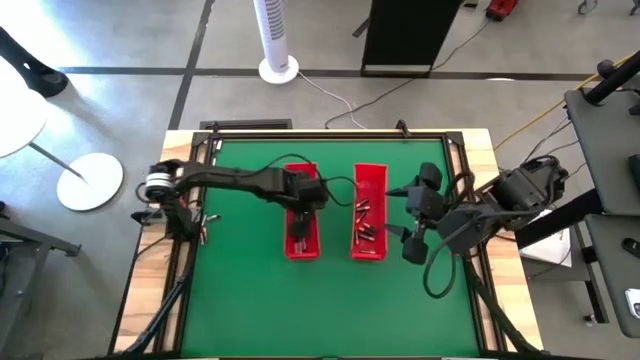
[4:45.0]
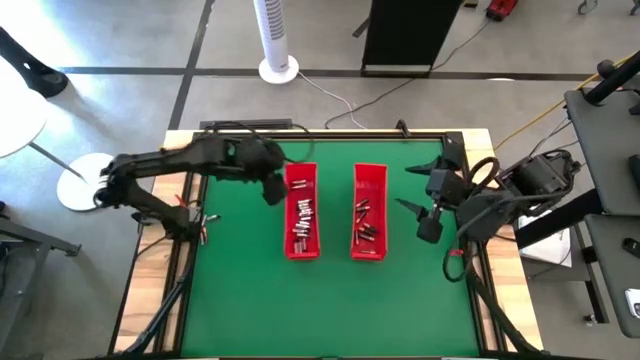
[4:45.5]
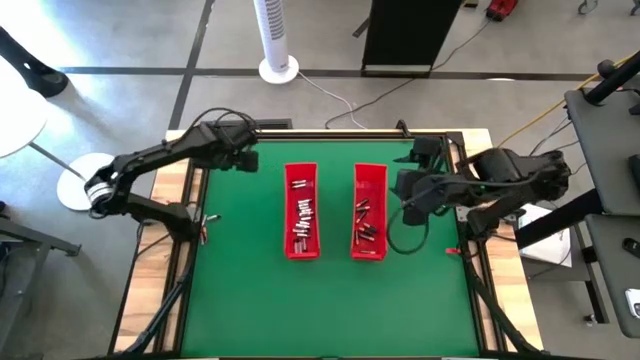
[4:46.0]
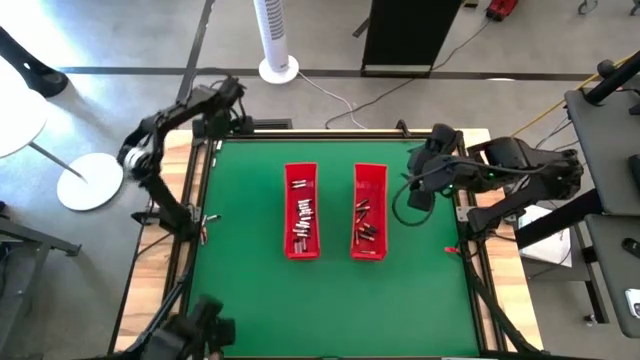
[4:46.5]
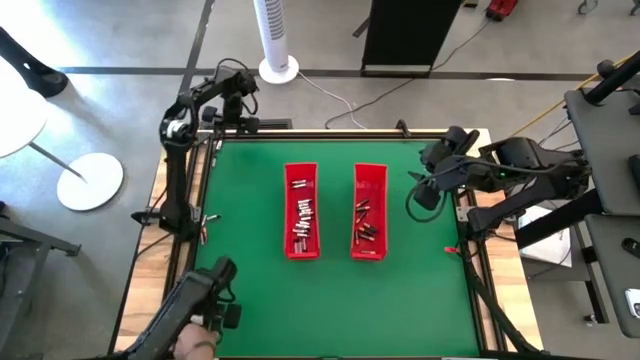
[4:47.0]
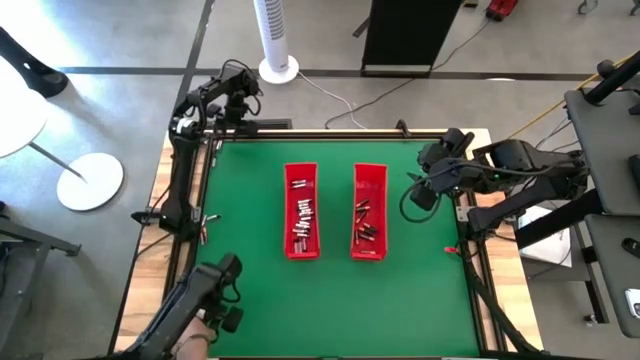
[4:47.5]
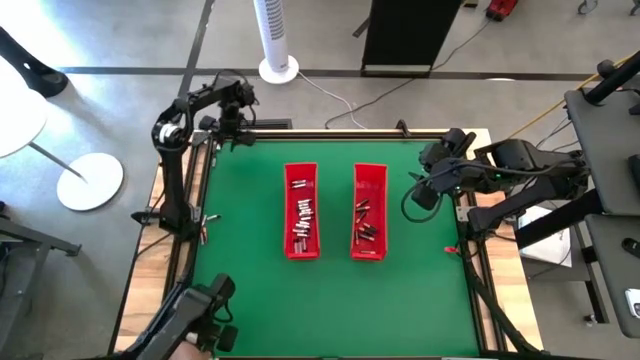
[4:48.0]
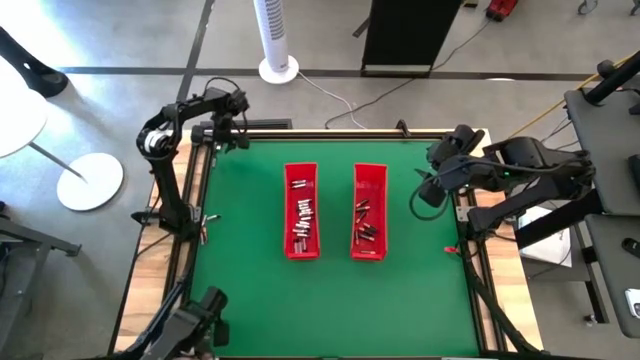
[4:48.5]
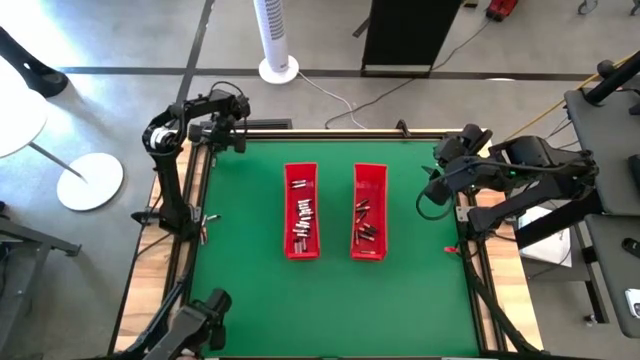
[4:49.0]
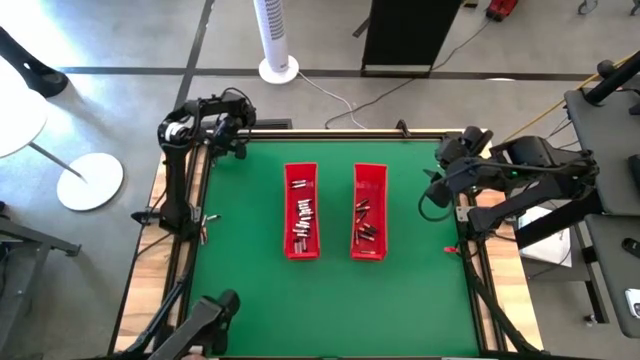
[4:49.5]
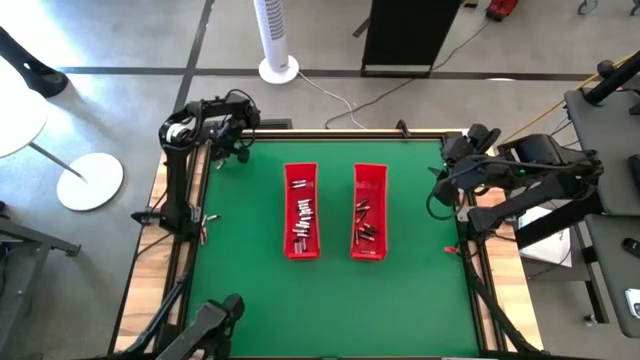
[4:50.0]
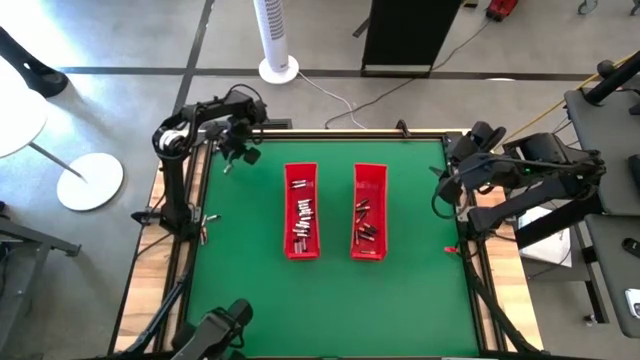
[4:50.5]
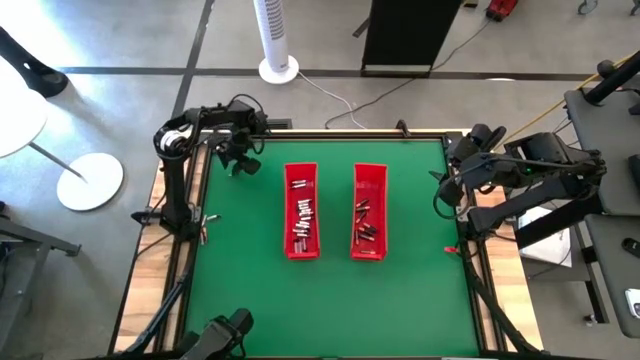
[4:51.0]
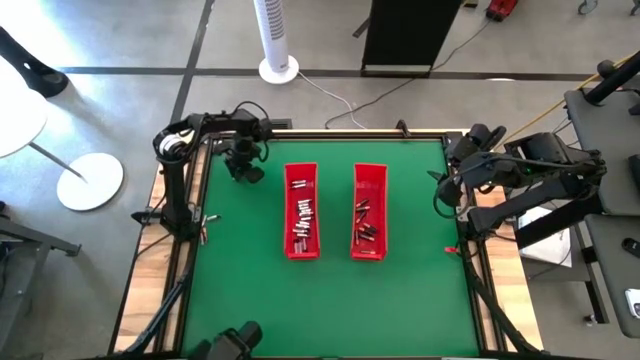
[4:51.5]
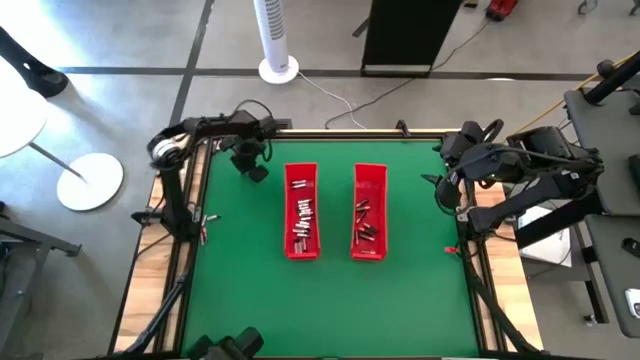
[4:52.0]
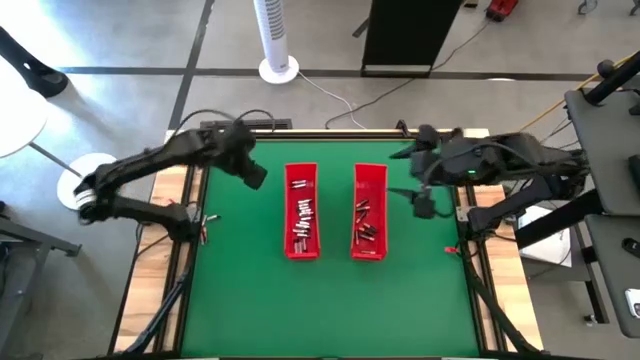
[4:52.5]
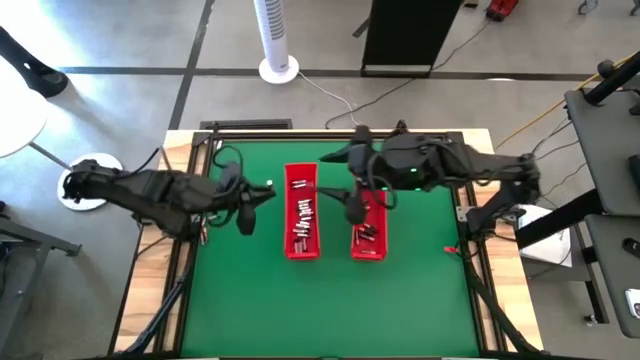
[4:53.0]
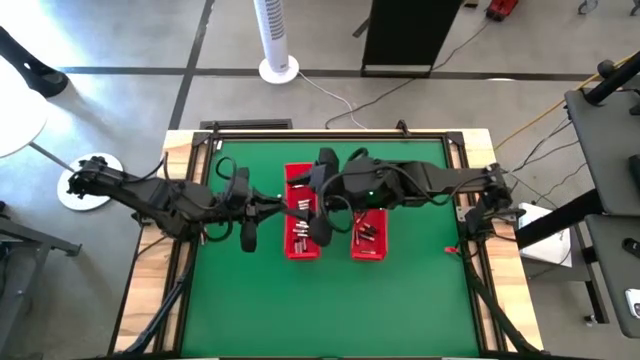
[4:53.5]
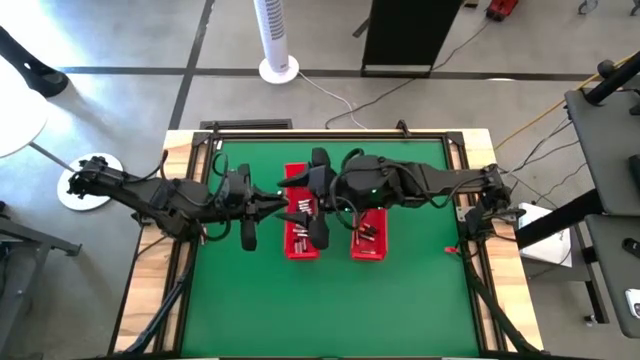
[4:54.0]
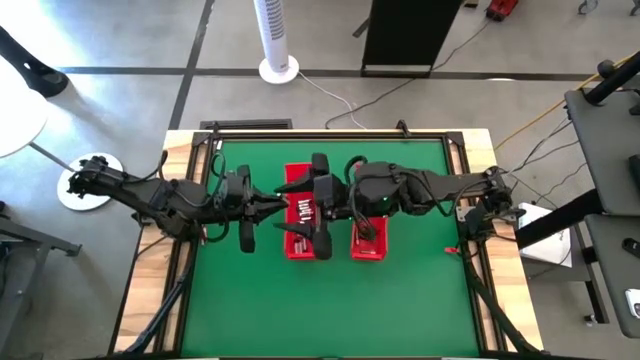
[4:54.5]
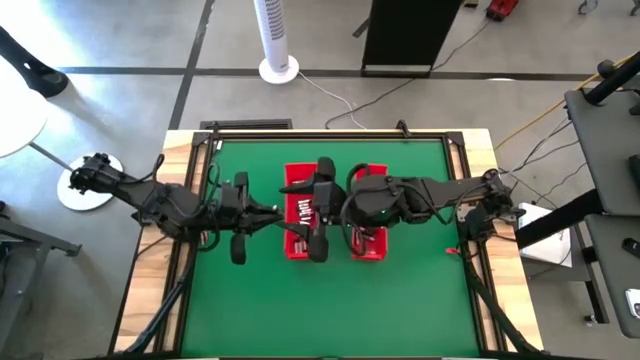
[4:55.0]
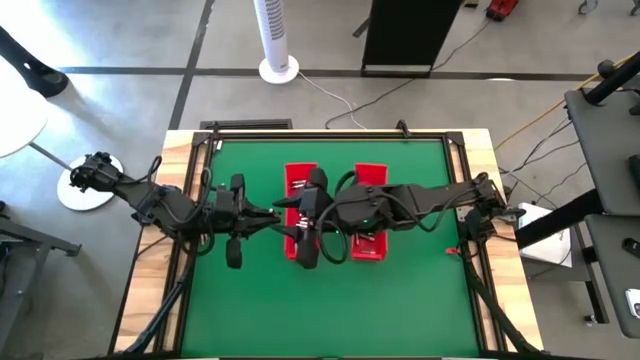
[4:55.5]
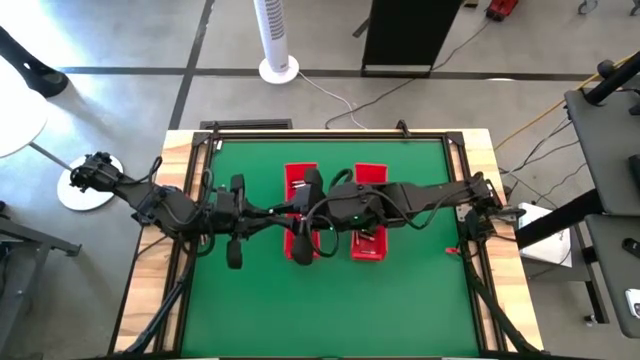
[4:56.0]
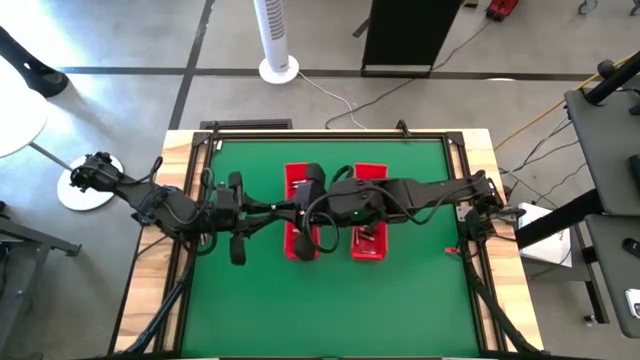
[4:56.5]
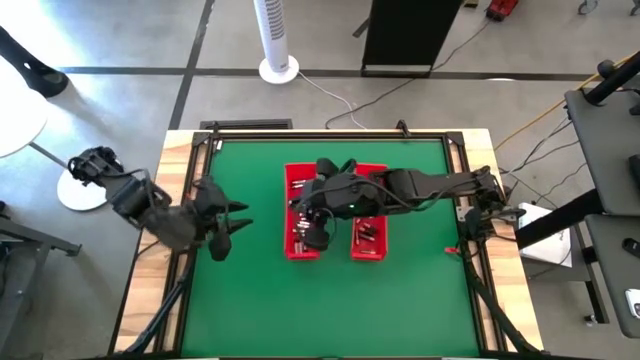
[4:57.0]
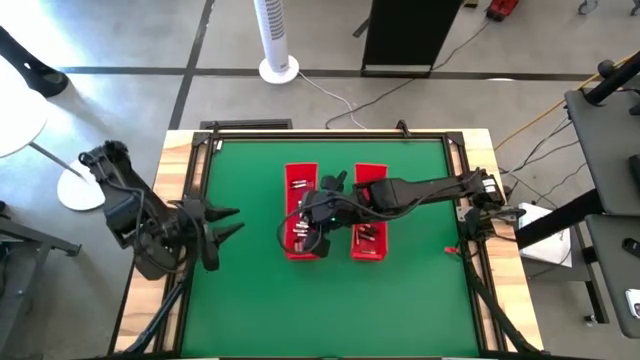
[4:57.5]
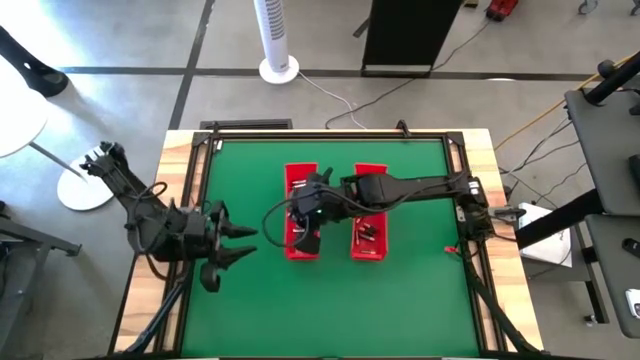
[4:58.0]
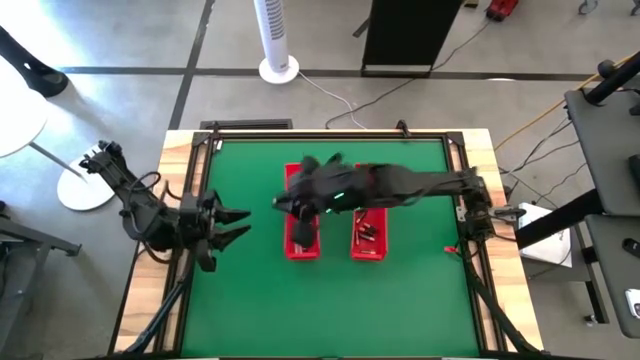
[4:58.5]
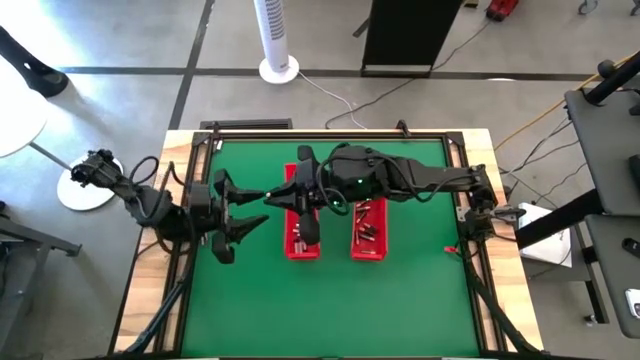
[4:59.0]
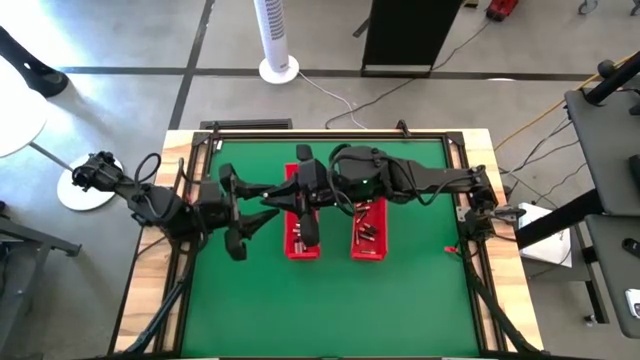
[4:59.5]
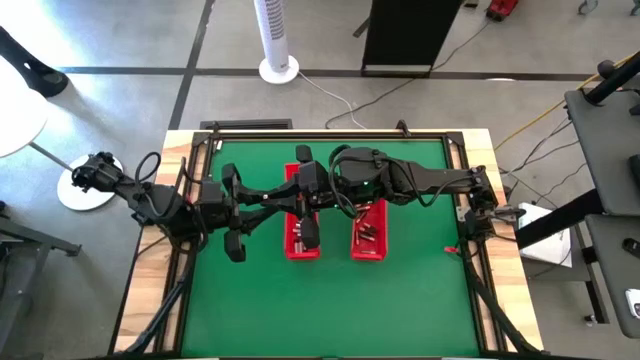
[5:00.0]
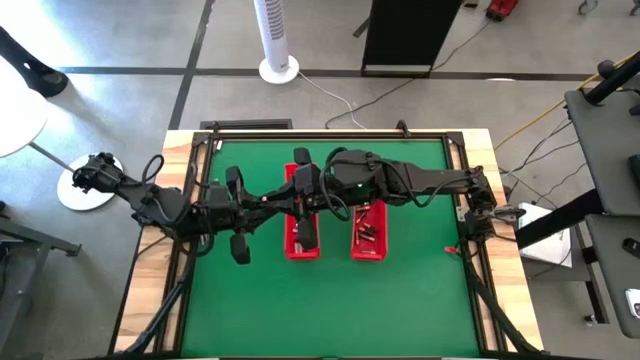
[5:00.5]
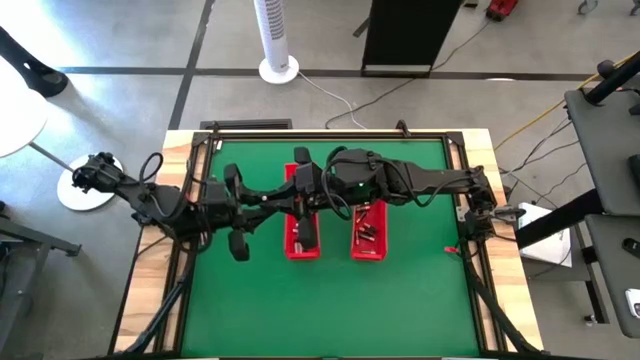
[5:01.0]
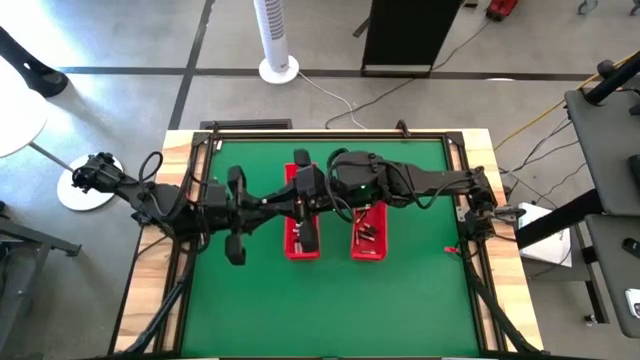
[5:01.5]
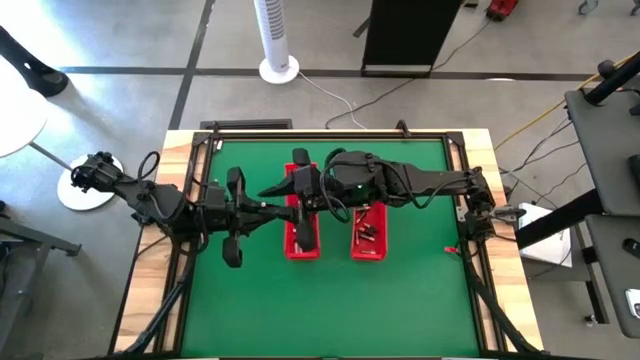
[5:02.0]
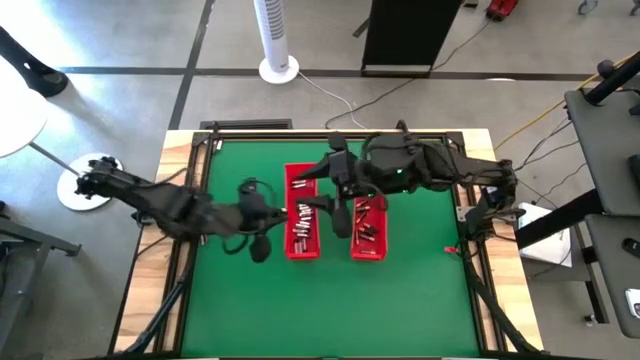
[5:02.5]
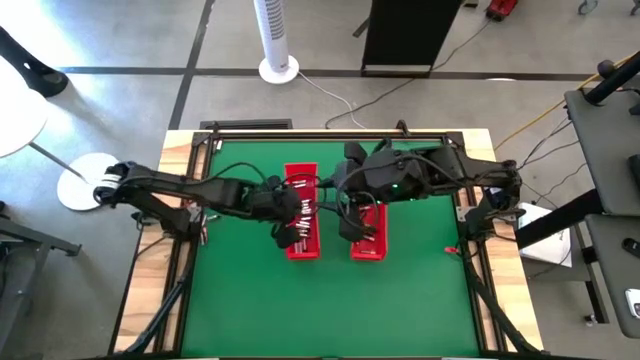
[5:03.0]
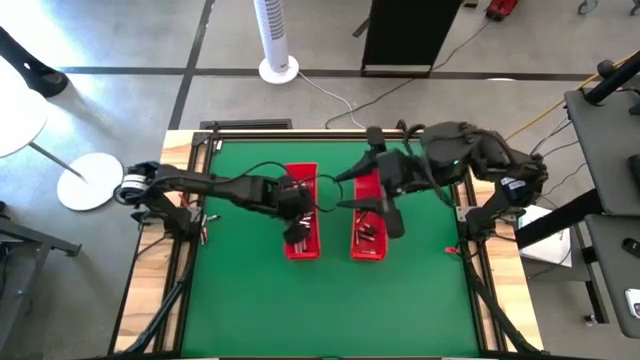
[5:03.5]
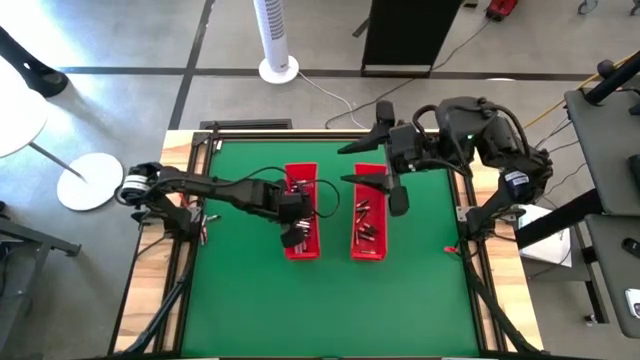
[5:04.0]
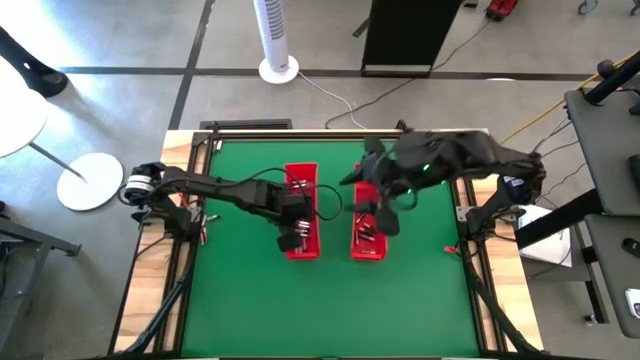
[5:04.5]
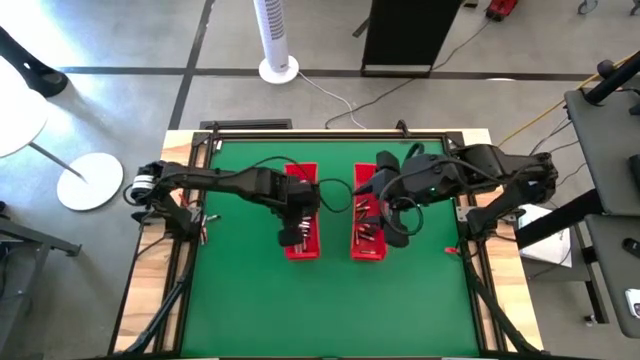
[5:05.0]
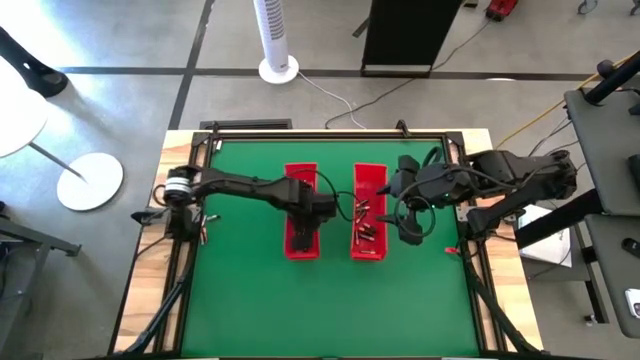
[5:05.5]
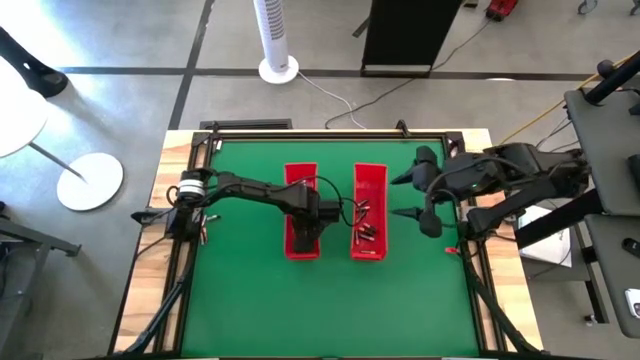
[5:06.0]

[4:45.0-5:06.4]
Task: Sort batteries
Put the silver battery into the left red bin
